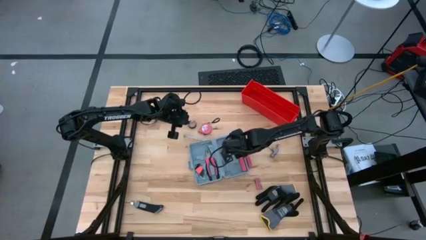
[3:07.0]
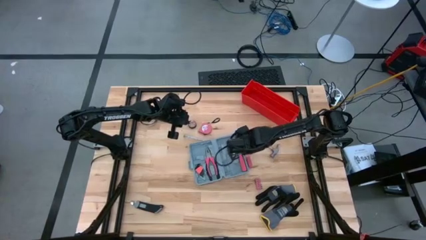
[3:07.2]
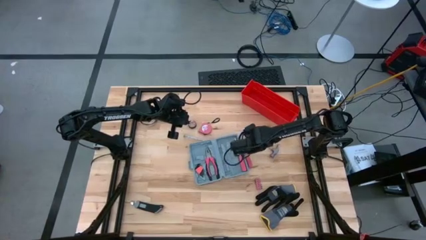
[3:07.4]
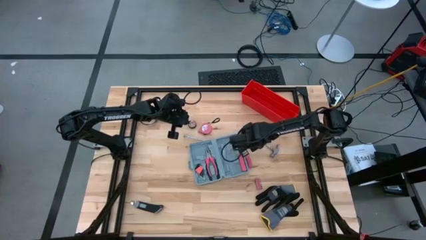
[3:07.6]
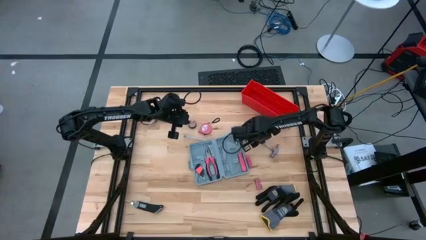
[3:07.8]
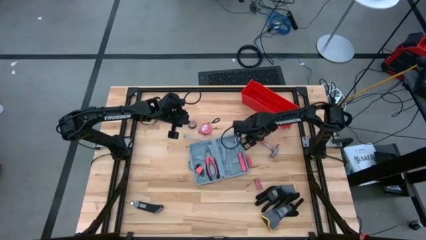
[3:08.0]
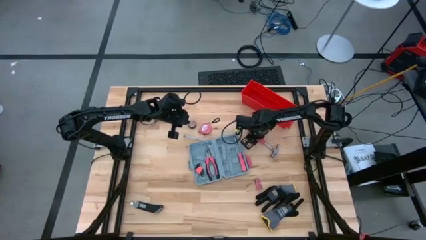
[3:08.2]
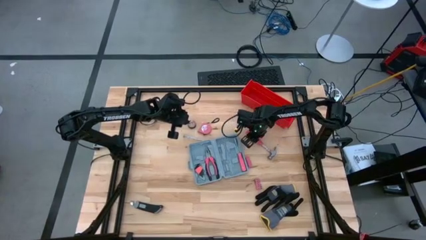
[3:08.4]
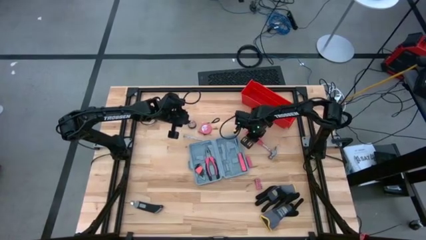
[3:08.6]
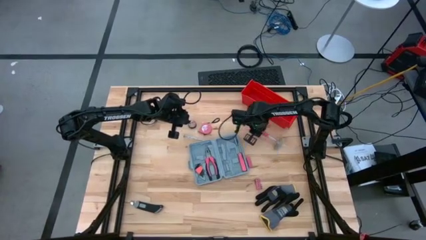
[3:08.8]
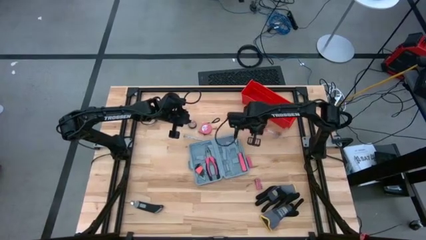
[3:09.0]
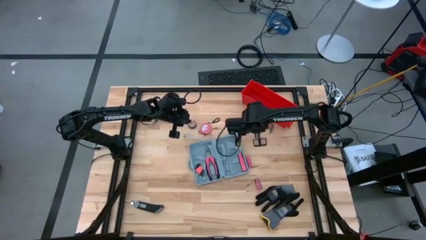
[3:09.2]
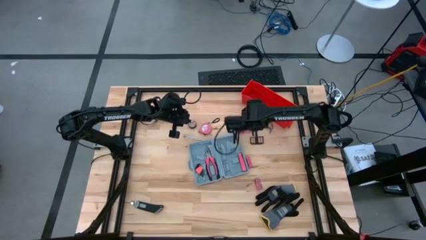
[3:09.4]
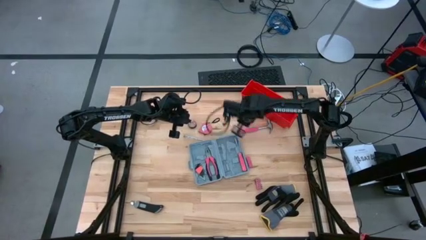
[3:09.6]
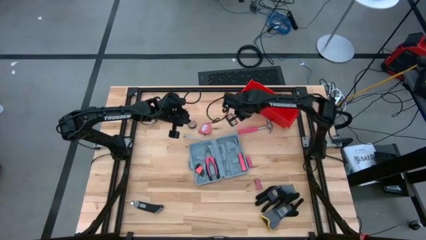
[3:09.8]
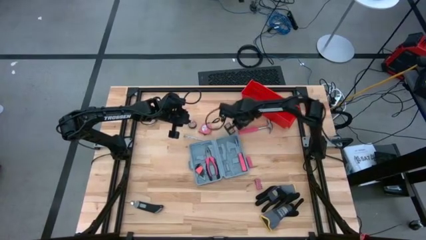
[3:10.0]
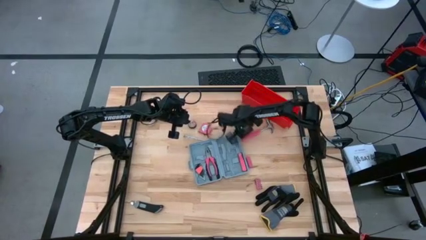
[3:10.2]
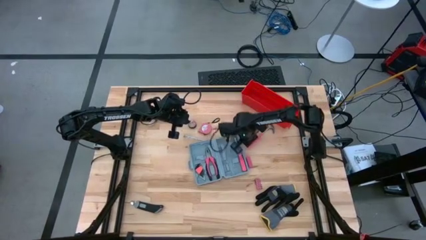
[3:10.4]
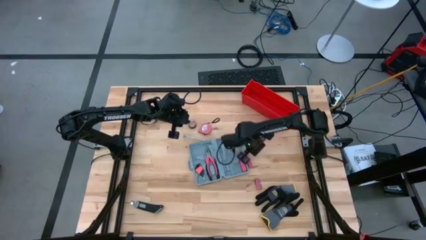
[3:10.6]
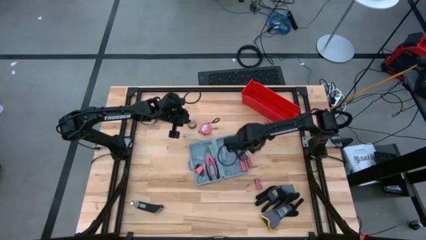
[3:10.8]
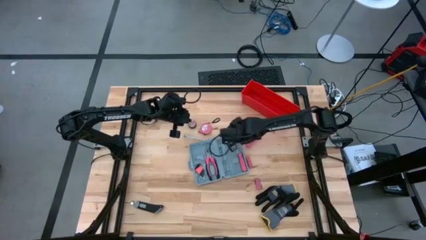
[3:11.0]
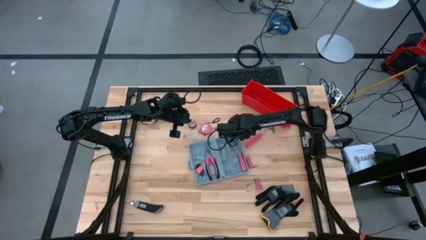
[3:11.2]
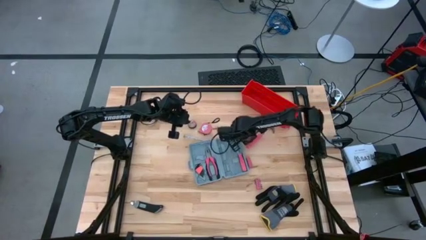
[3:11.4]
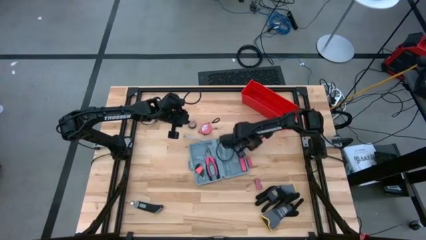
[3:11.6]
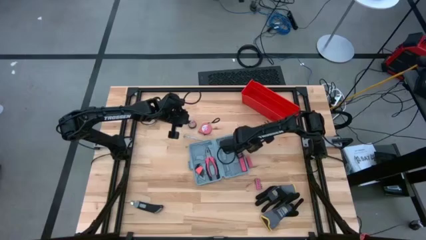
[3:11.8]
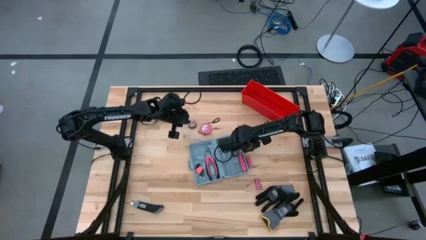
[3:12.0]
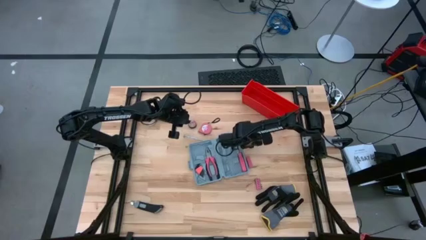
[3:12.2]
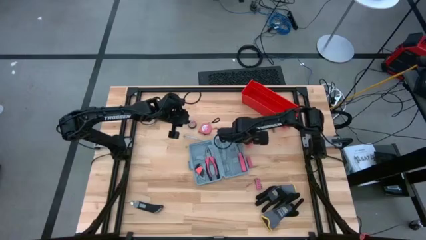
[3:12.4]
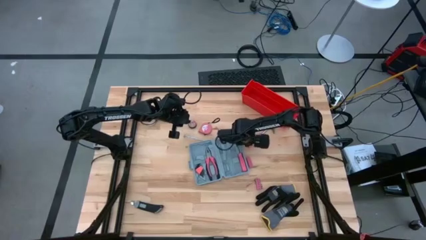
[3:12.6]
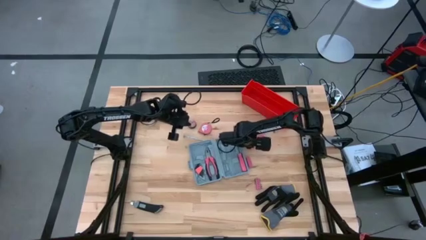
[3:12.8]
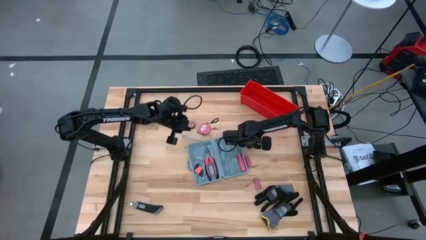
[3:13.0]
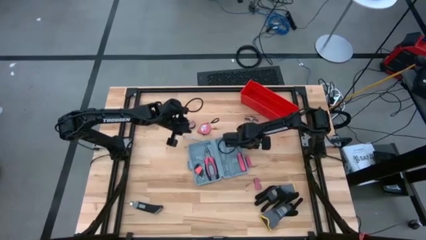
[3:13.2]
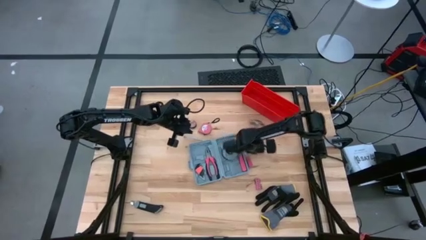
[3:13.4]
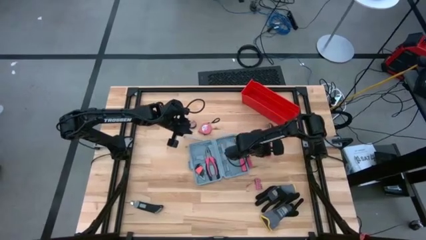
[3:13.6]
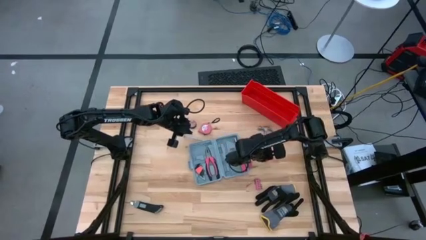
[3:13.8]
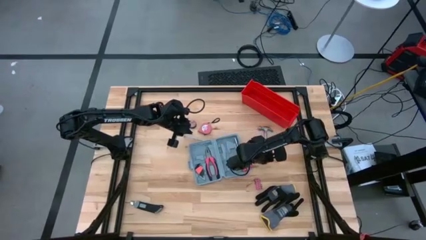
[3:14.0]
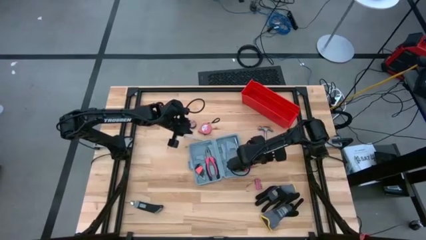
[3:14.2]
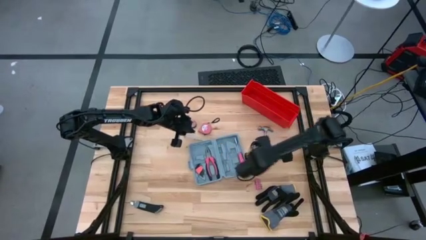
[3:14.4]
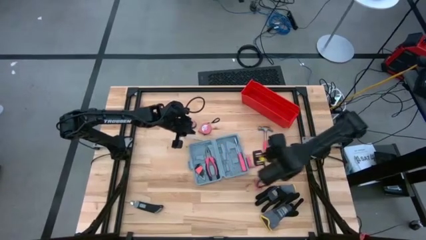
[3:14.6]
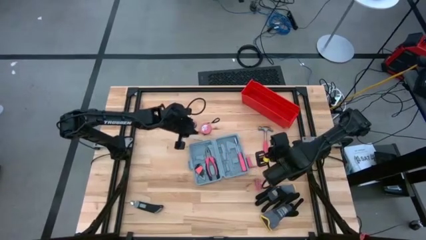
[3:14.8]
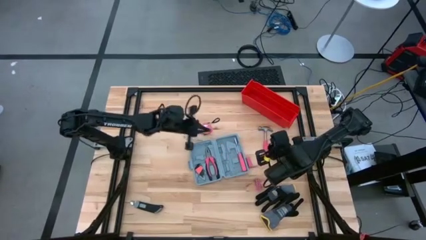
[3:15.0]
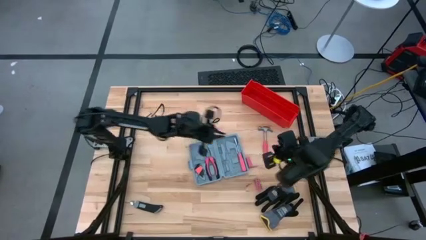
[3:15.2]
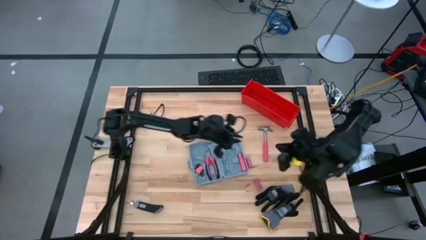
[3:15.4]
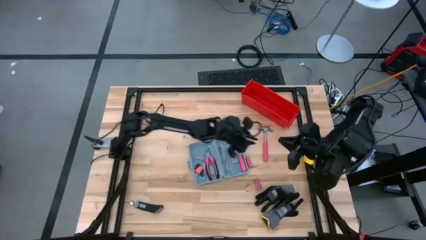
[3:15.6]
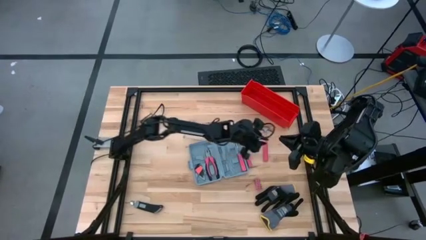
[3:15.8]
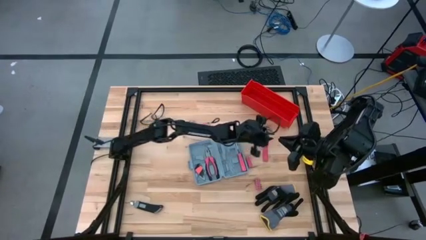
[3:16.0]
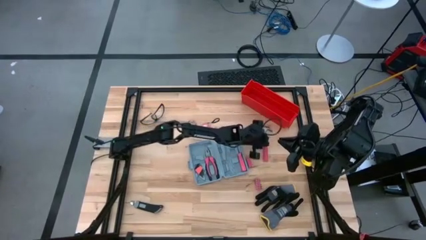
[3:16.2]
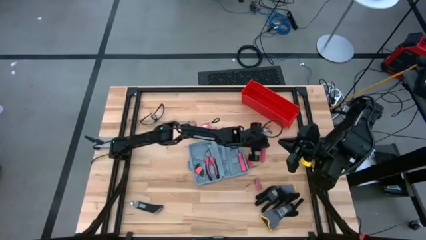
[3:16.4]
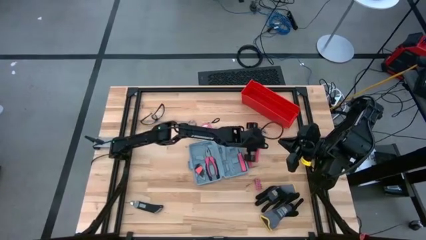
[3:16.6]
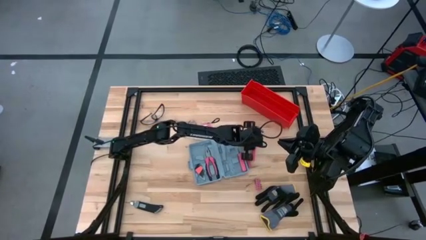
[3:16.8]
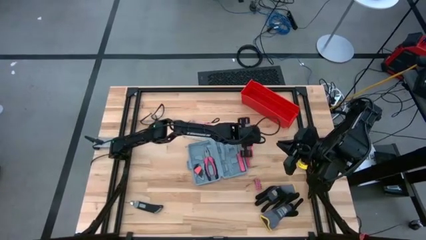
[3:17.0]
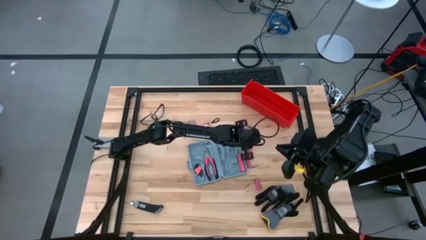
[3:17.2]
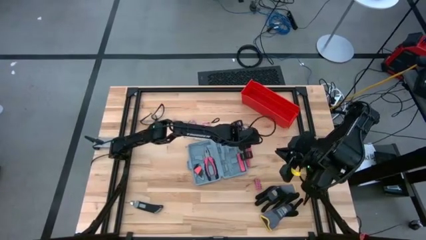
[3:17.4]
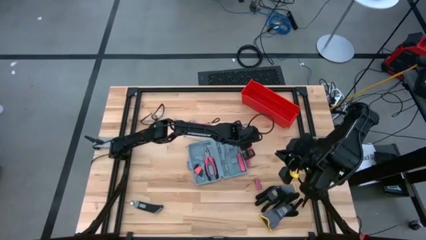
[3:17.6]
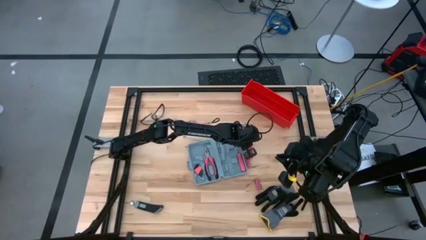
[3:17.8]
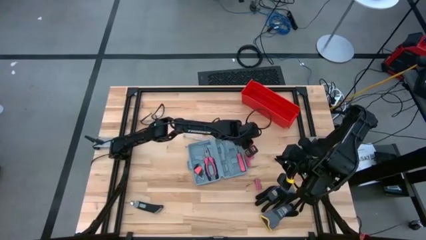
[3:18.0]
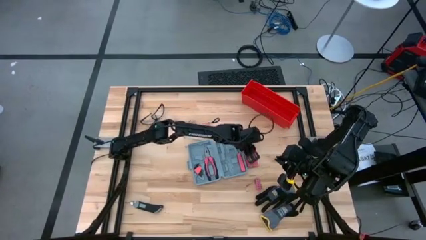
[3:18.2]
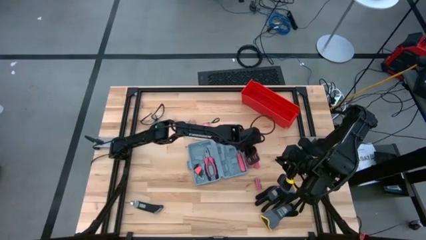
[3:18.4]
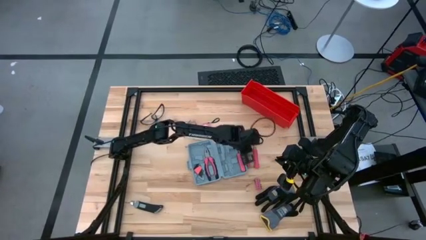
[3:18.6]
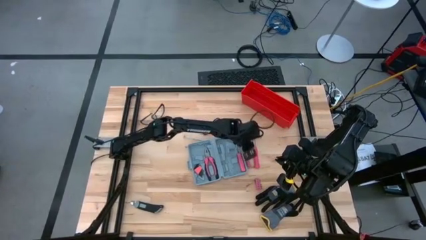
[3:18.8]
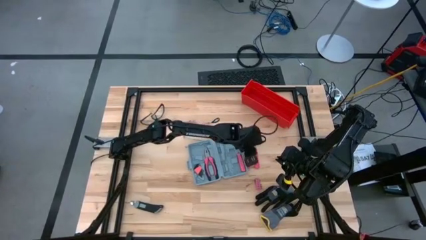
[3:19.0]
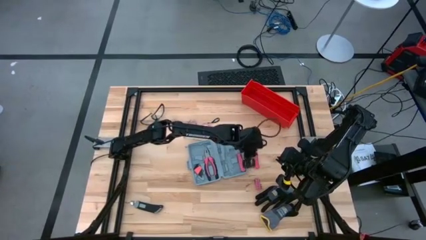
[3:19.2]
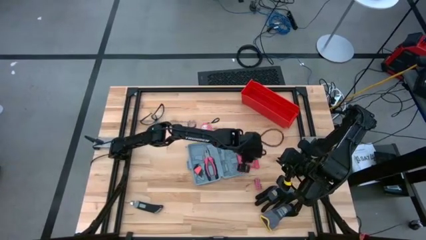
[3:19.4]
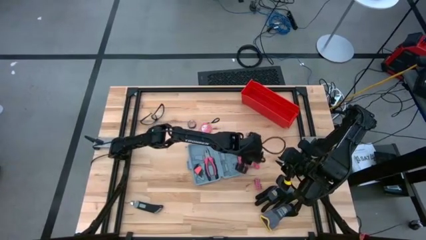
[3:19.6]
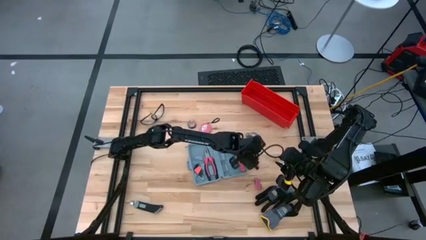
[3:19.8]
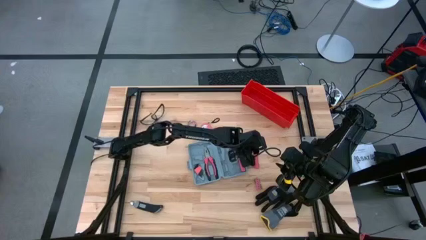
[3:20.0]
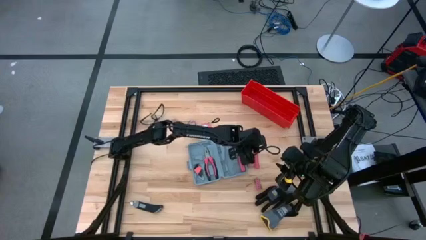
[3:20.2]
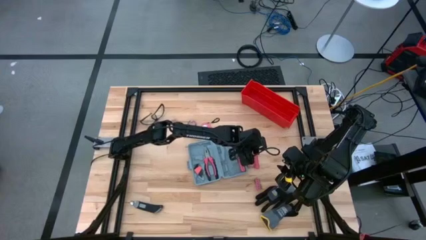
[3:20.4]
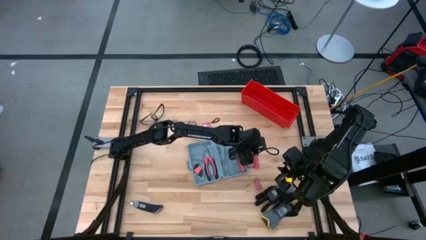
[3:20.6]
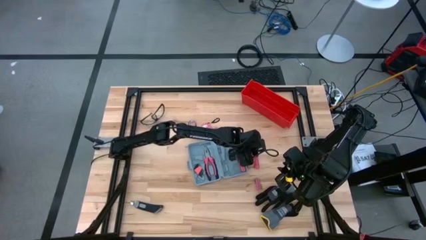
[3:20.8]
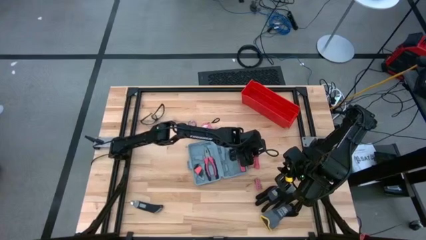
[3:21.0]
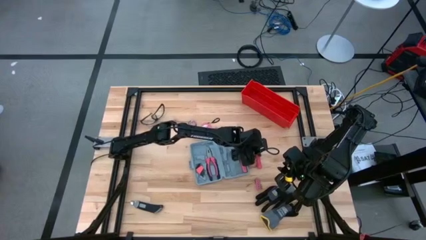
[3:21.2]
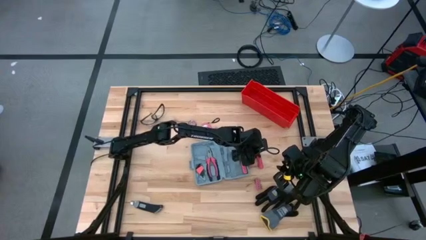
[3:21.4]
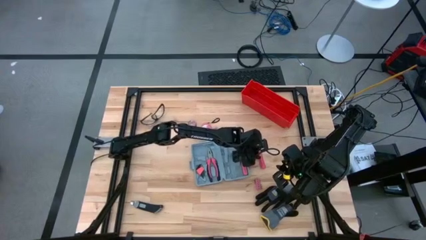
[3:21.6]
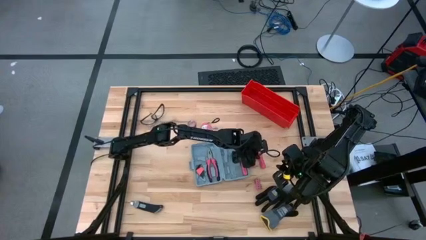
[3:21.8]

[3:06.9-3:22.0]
Task: prefit tool cases
Put the hammer into the toolbox
